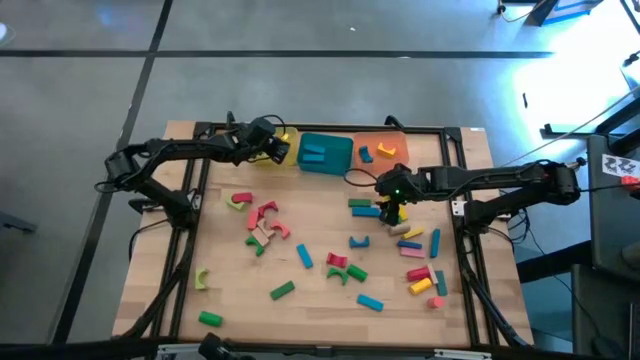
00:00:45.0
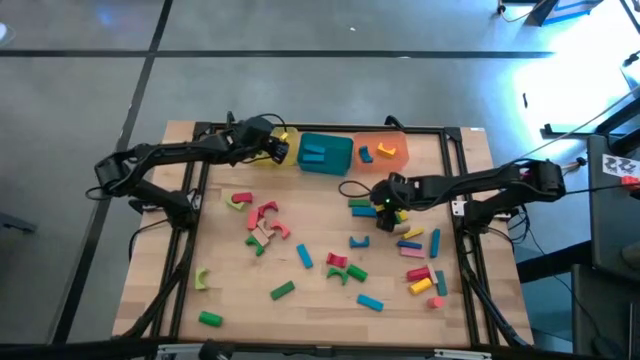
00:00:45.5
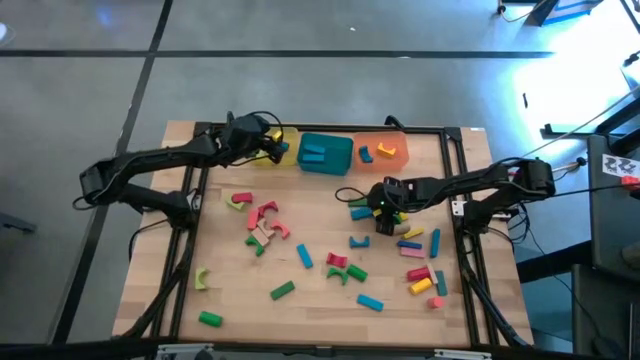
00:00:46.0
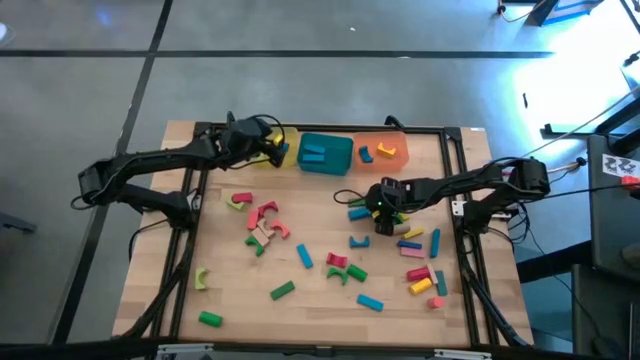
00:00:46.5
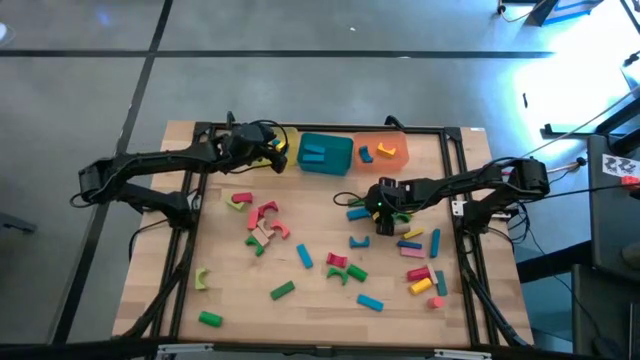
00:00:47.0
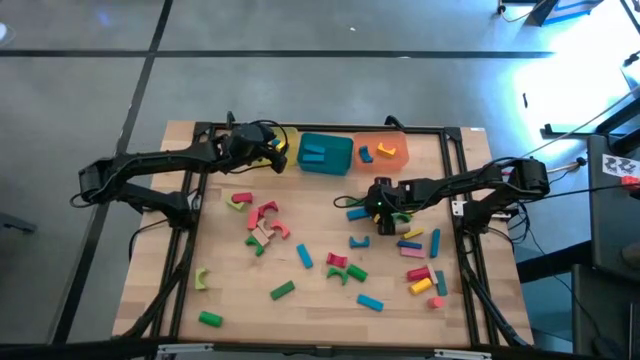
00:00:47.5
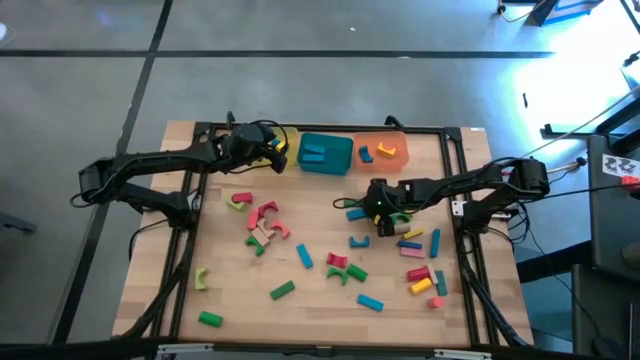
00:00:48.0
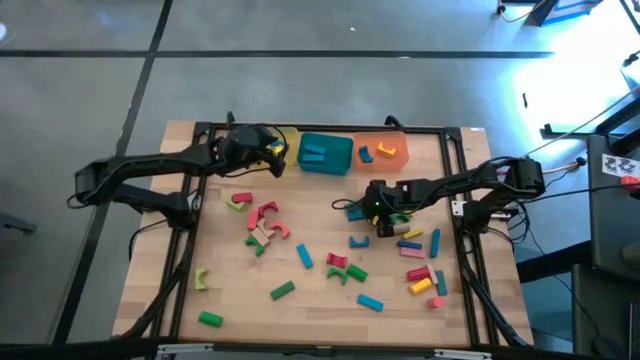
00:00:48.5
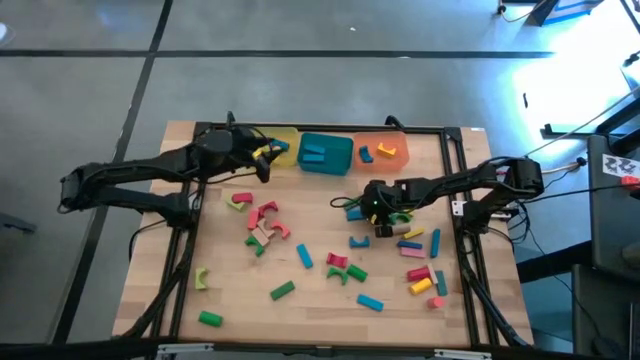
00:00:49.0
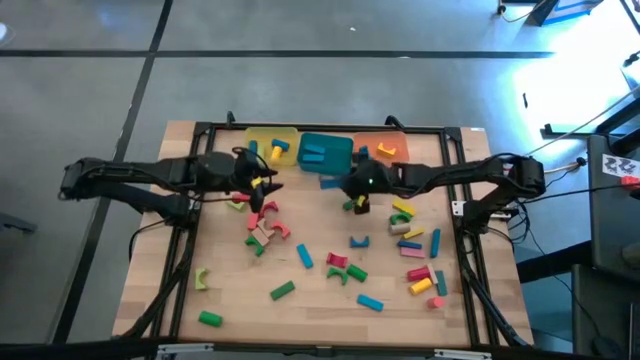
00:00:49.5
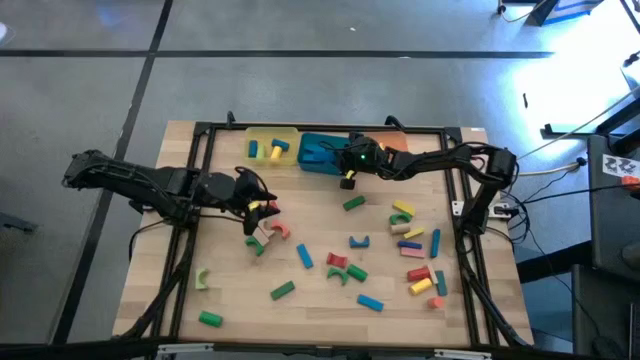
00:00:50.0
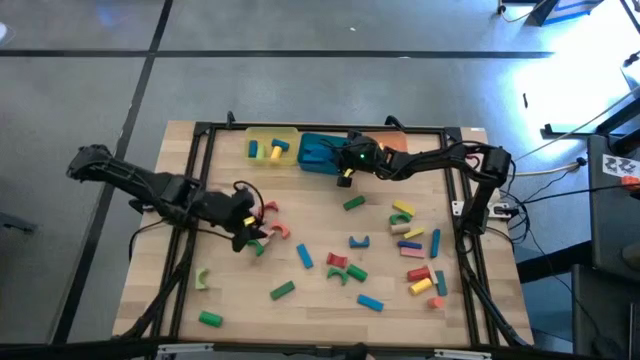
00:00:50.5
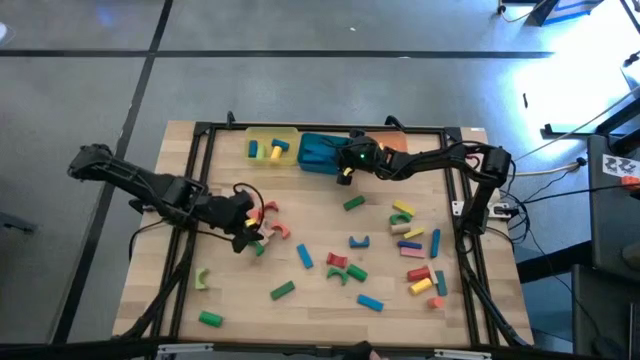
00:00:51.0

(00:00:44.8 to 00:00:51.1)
Task: Sort blocks by size
Put the blue rectangle block into the blue bin

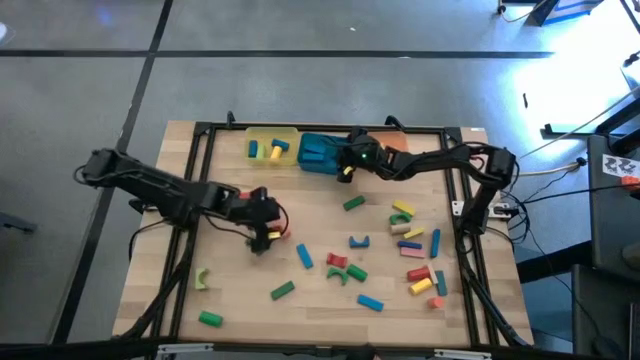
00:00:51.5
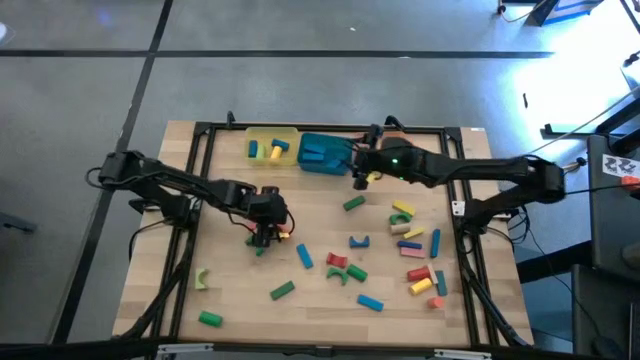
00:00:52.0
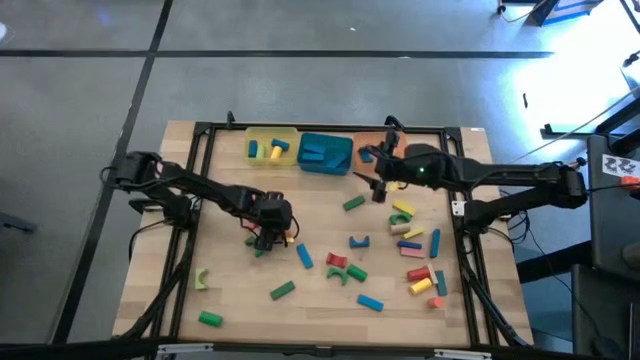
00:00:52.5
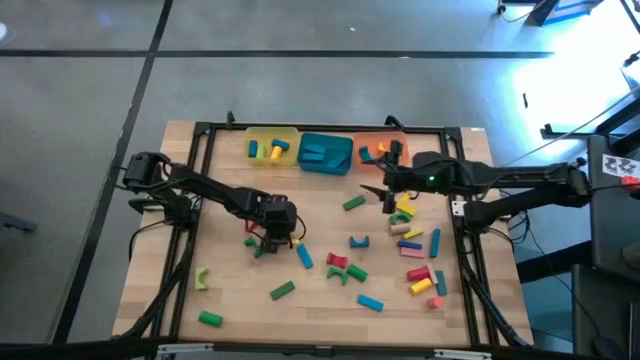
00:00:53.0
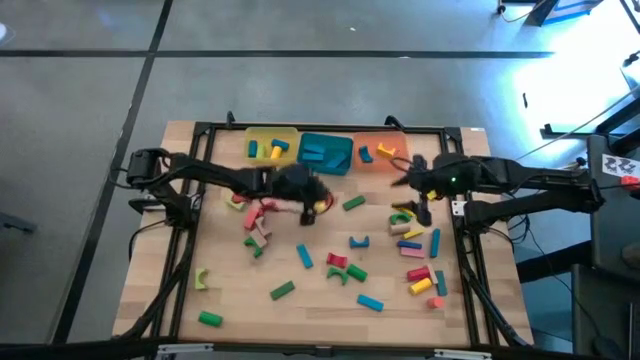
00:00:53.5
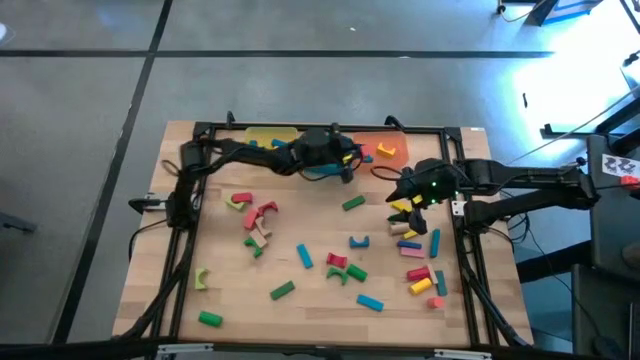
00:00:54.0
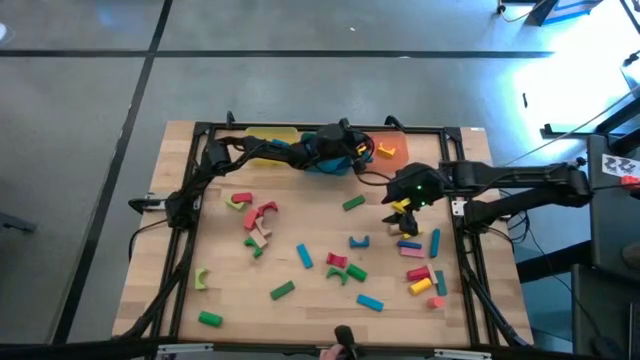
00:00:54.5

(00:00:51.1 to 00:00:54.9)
Put the orange arch block into the orange bin

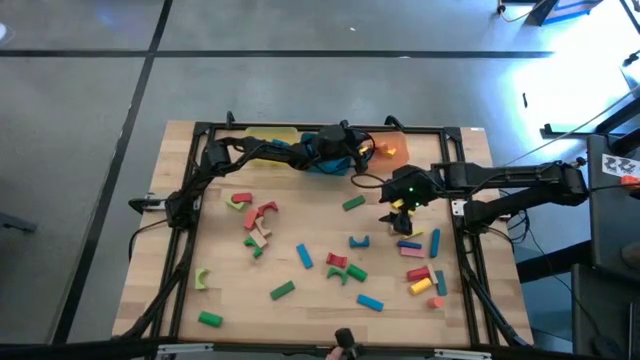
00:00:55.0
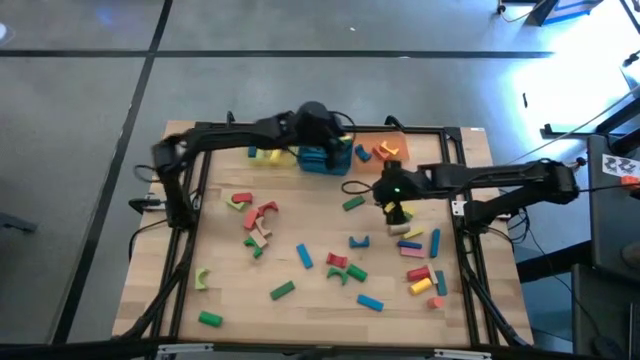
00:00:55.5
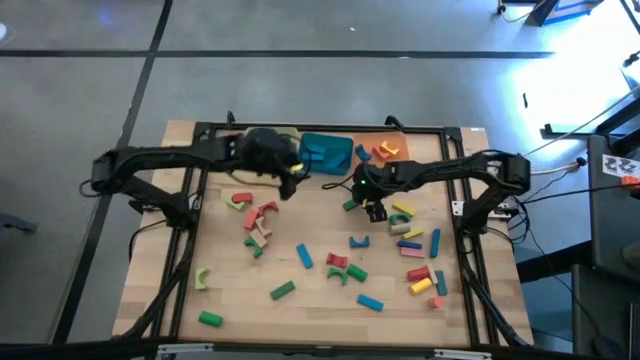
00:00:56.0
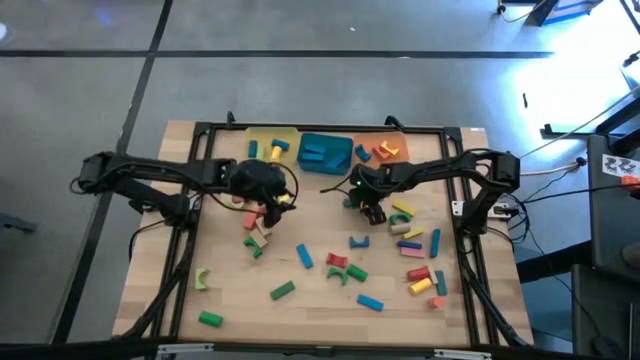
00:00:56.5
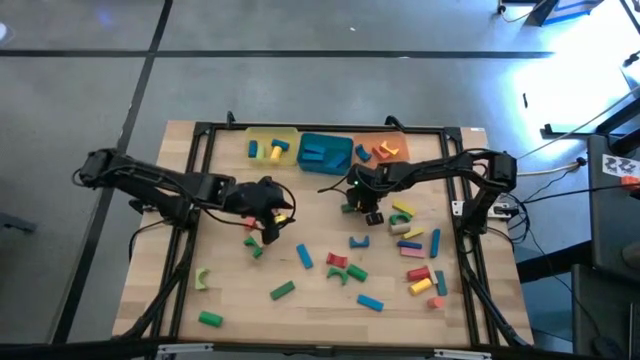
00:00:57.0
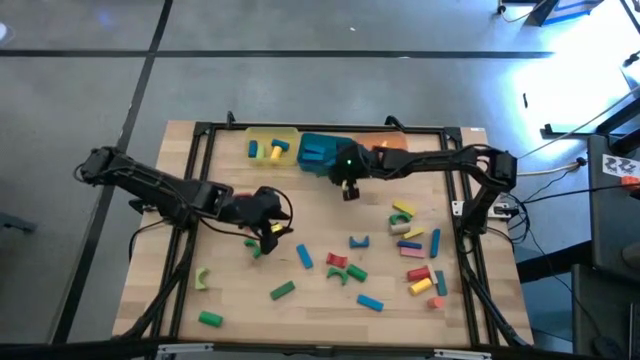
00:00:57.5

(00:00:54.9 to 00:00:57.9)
Put the green rectangle block into the blue bin

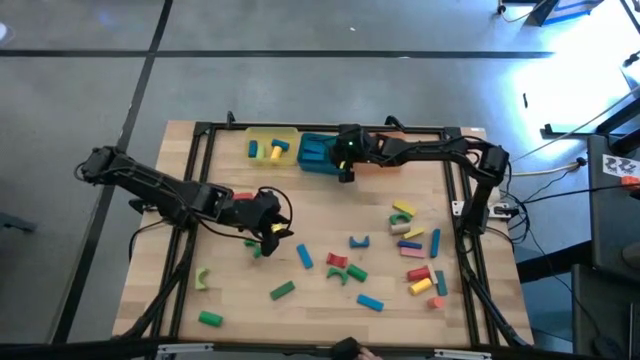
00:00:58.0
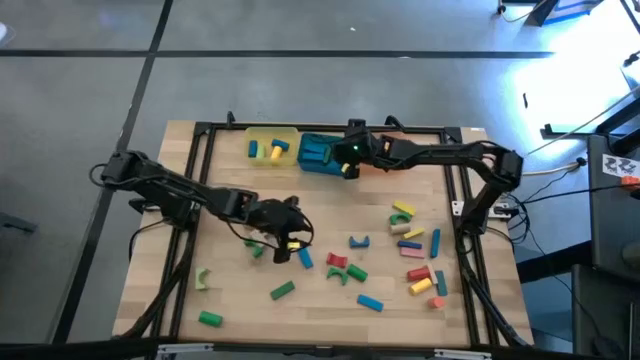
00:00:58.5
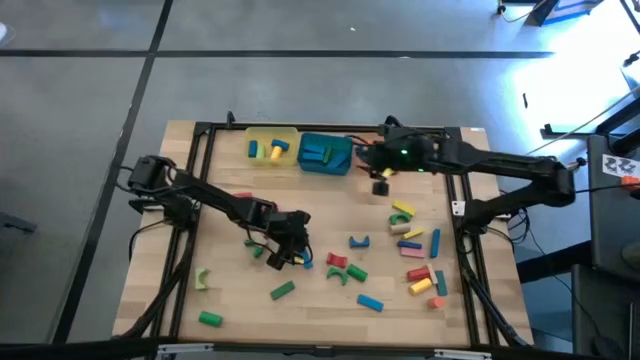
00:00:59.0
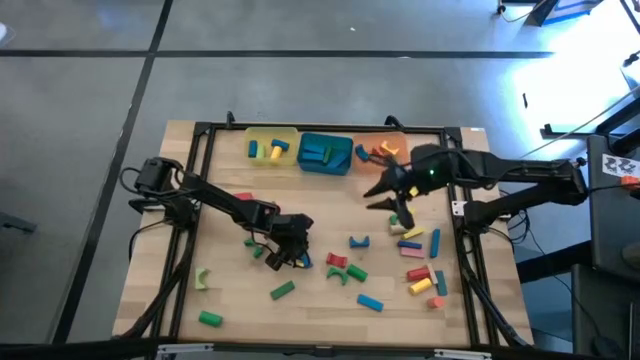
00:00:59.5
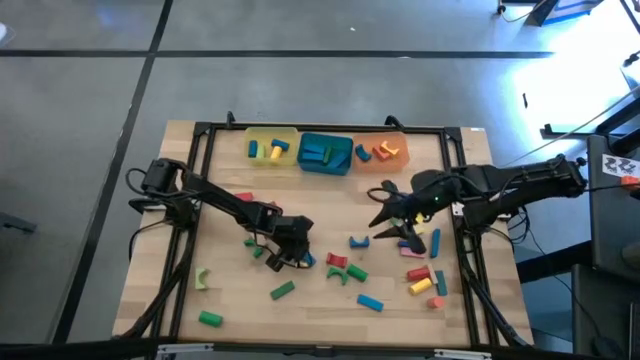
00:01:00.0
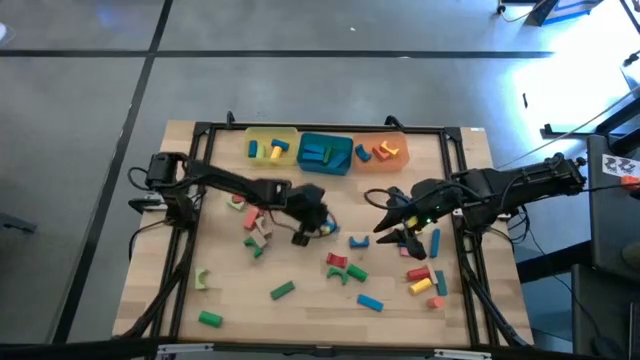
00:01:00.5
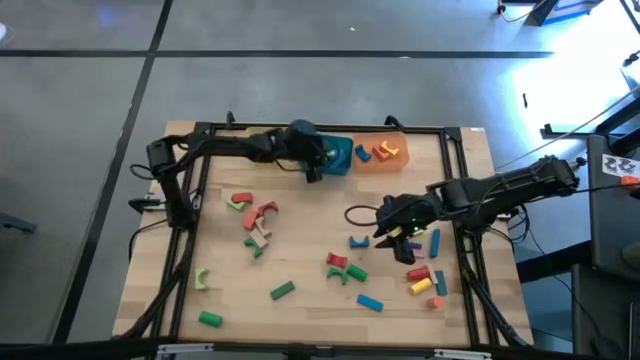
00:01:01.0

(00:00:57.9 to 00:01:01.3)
Put the blue rectangle block into the blue bin

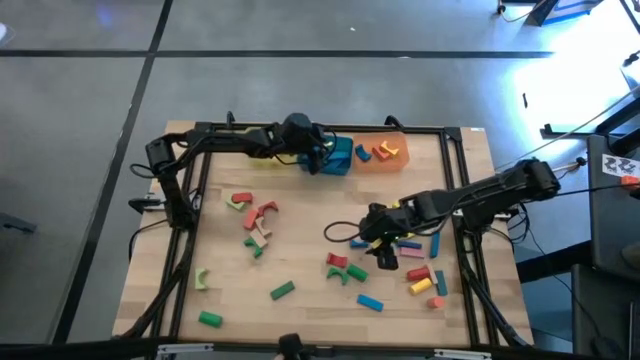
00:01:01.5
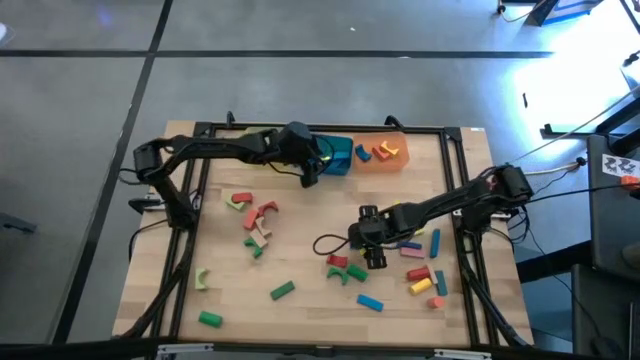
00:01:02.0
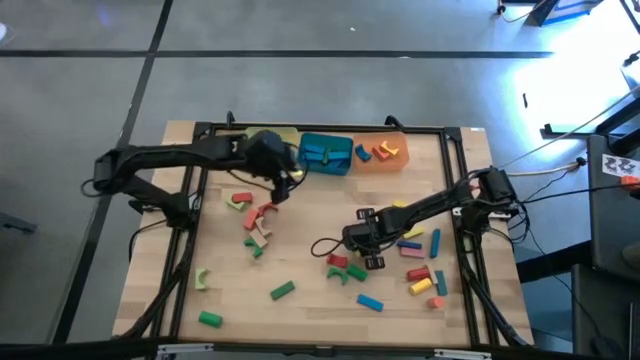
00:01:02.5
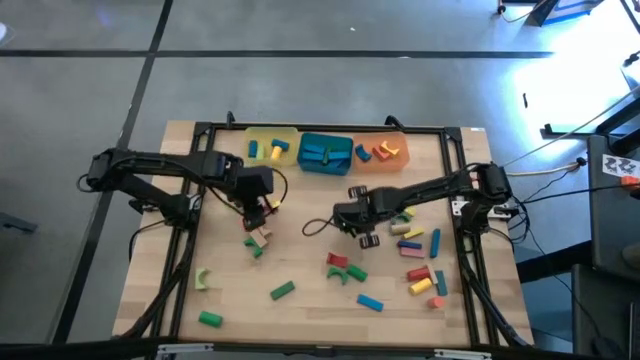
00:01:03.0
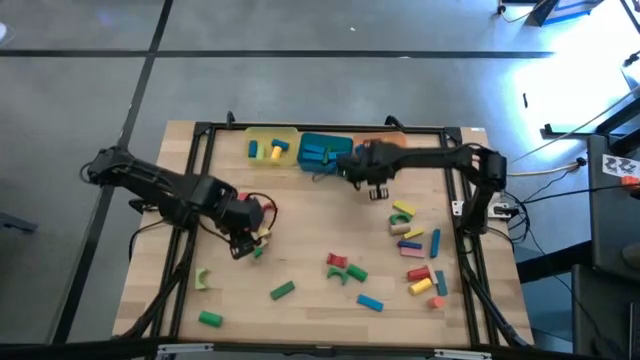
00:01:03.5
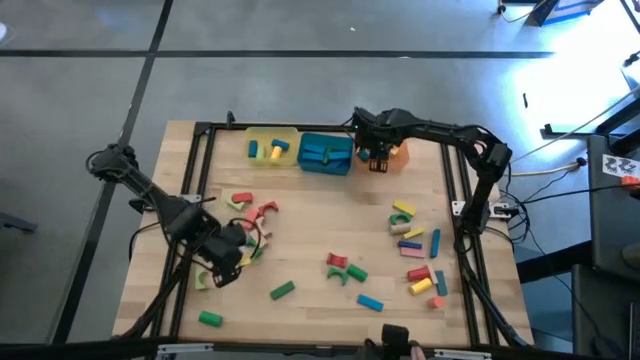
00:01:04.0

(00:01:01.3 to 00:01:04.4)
Put the blue arch block into the orange bin

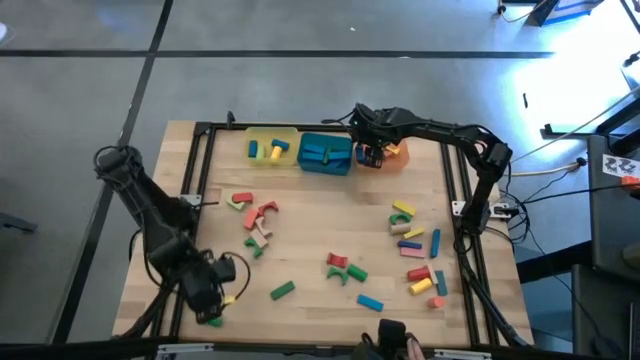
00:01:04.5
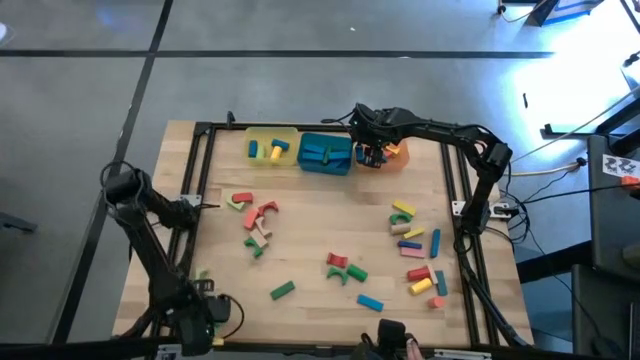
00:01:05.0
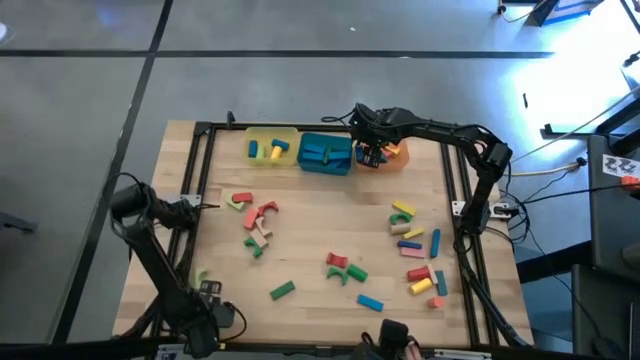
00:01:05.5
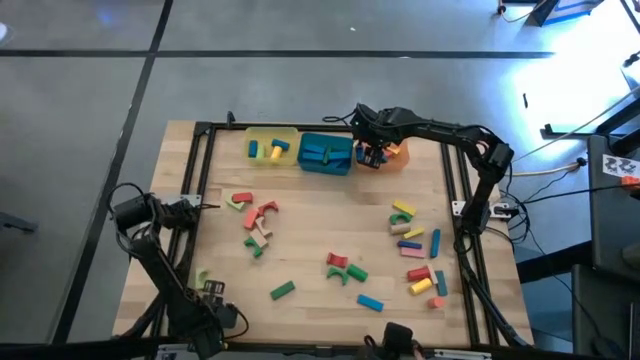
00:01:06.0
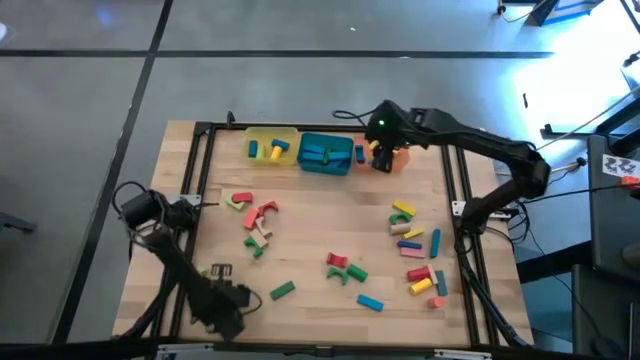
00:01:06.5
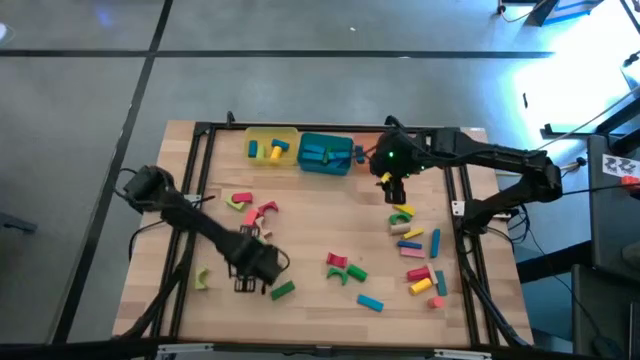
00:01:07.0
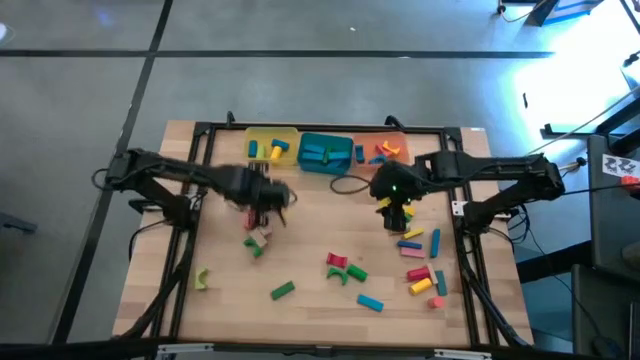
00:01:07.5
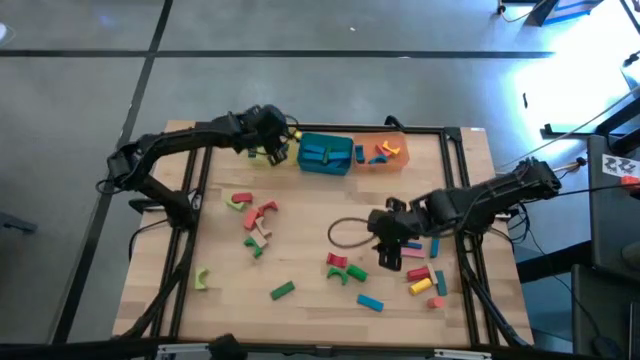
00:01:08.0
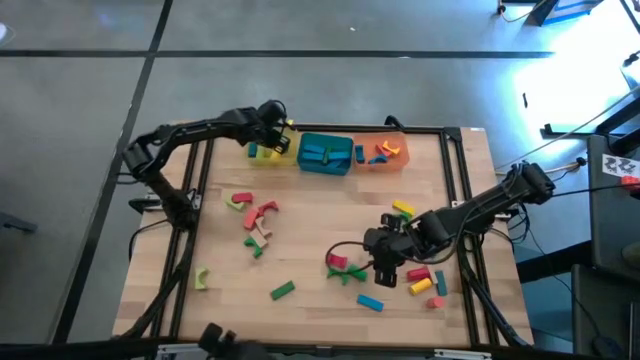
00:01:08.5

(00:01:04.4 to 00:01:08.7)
Put the green cylindrical block into the yellow bin
